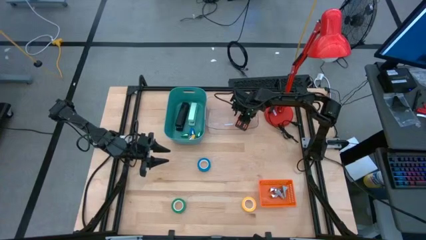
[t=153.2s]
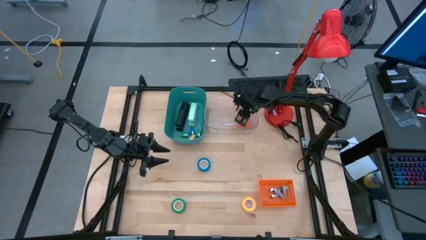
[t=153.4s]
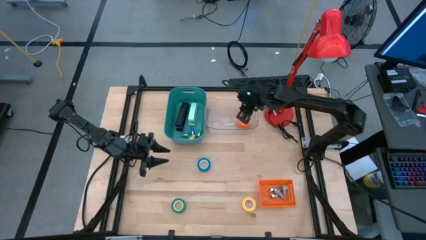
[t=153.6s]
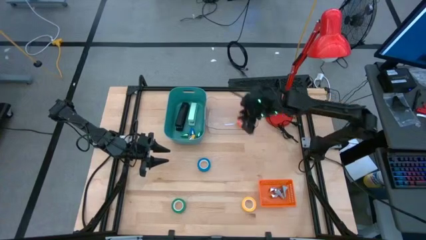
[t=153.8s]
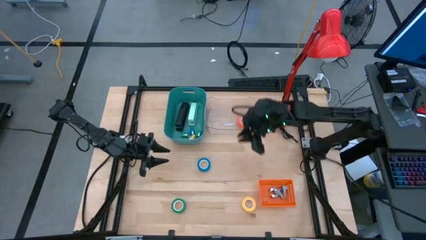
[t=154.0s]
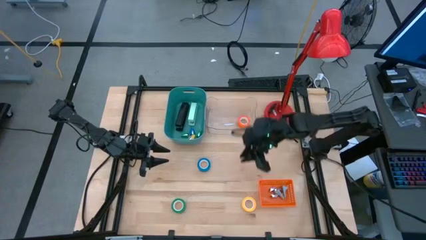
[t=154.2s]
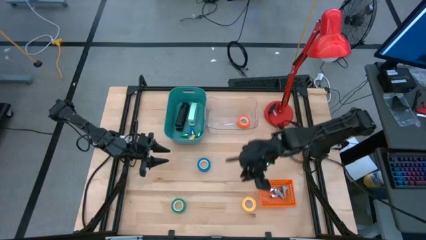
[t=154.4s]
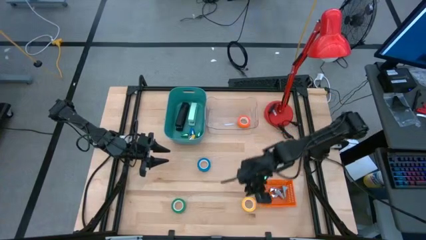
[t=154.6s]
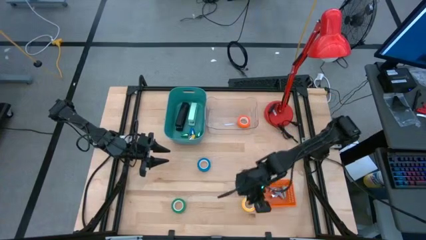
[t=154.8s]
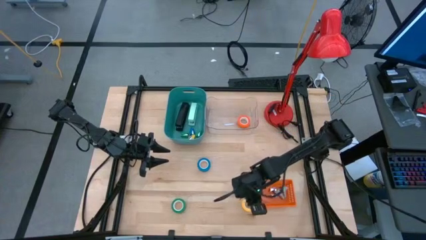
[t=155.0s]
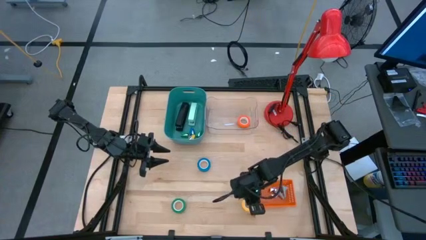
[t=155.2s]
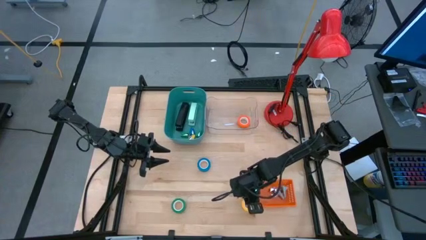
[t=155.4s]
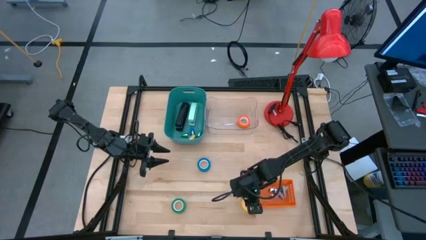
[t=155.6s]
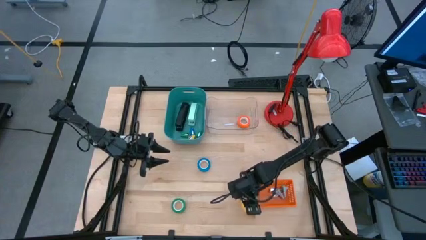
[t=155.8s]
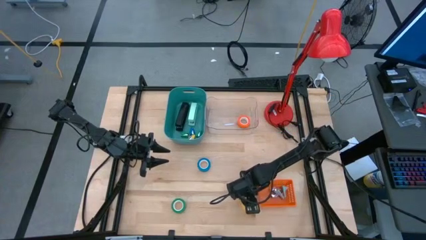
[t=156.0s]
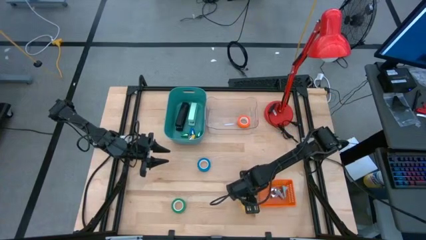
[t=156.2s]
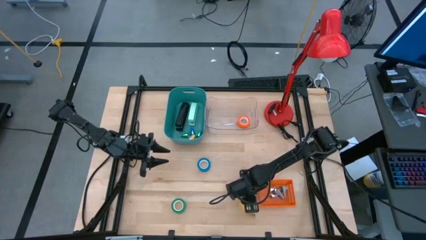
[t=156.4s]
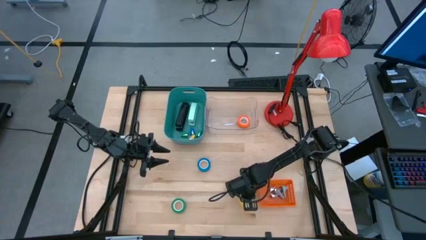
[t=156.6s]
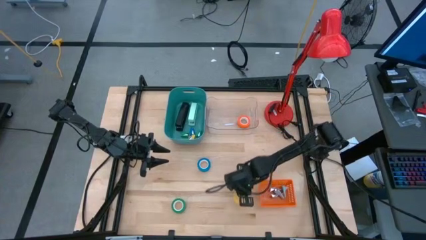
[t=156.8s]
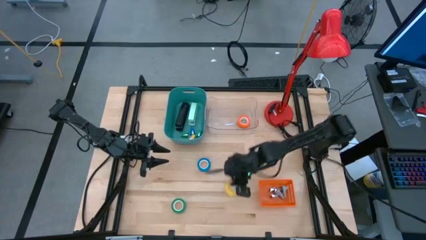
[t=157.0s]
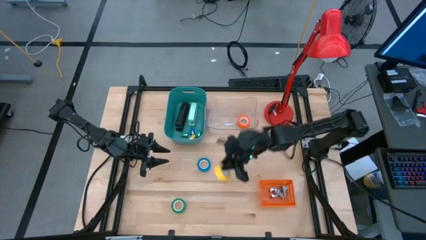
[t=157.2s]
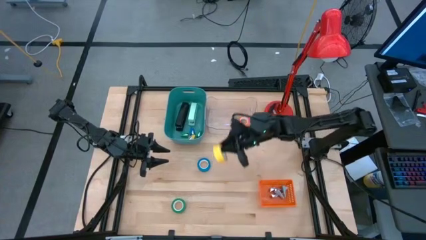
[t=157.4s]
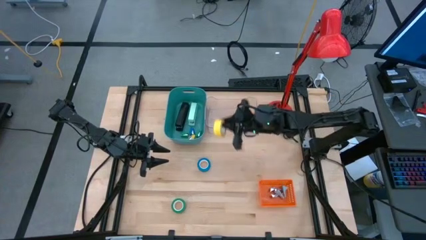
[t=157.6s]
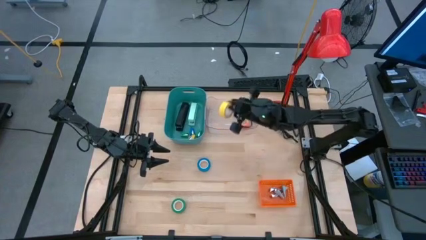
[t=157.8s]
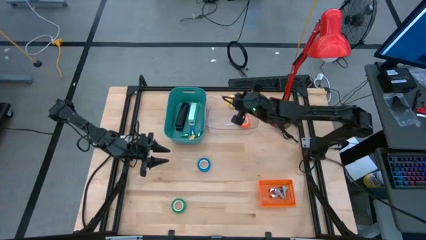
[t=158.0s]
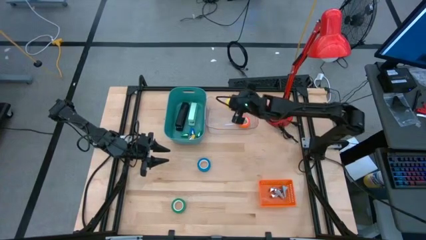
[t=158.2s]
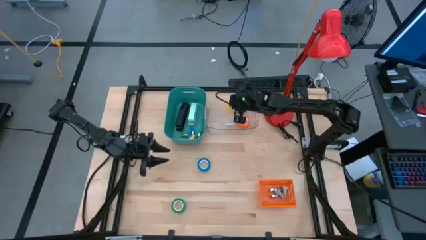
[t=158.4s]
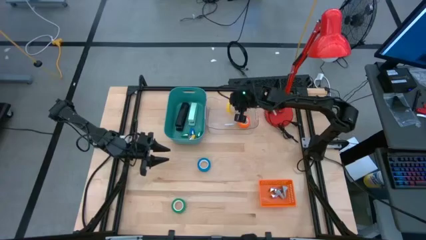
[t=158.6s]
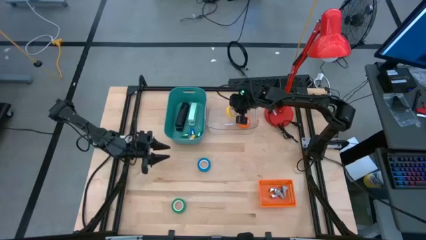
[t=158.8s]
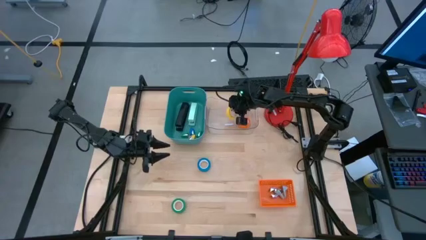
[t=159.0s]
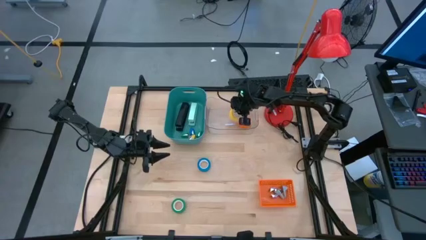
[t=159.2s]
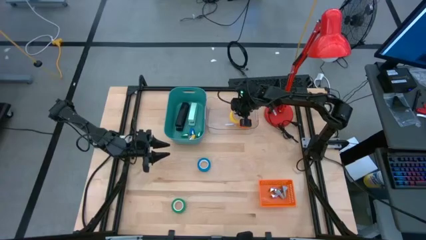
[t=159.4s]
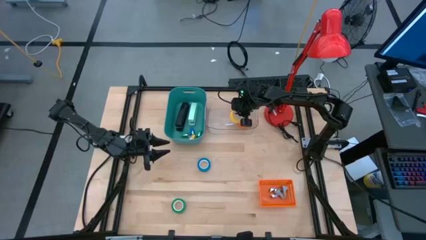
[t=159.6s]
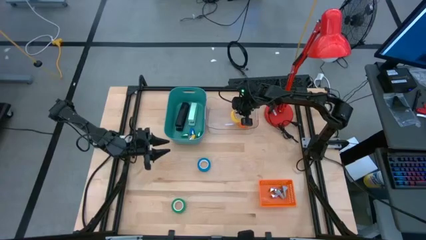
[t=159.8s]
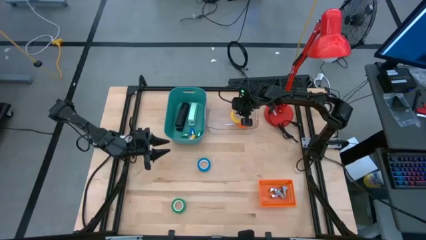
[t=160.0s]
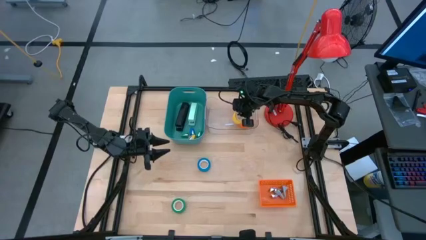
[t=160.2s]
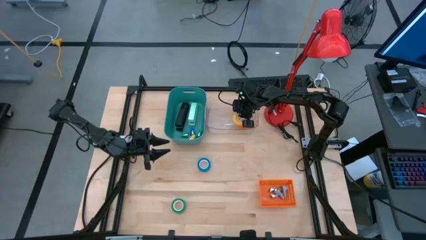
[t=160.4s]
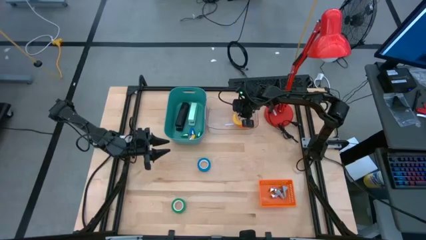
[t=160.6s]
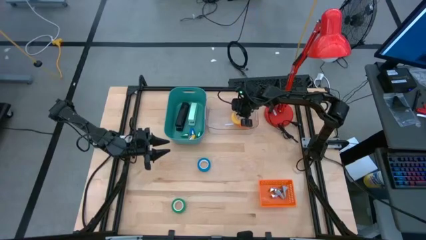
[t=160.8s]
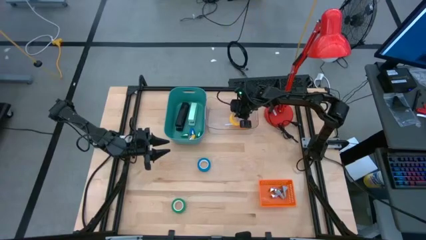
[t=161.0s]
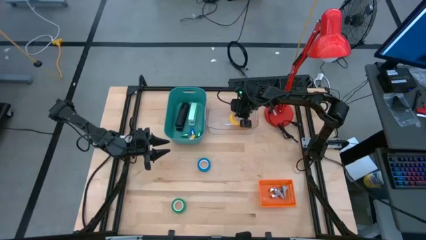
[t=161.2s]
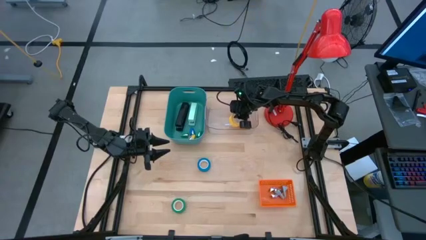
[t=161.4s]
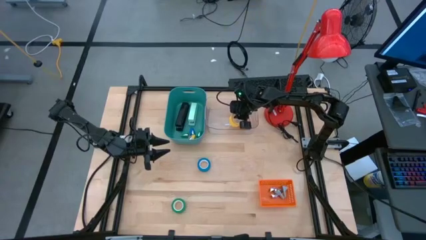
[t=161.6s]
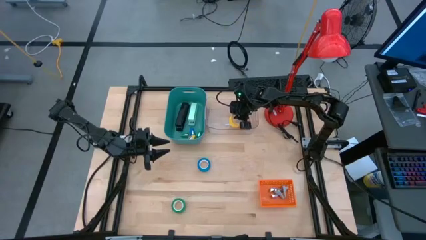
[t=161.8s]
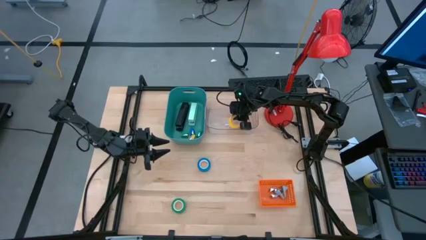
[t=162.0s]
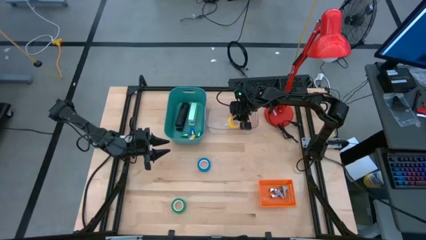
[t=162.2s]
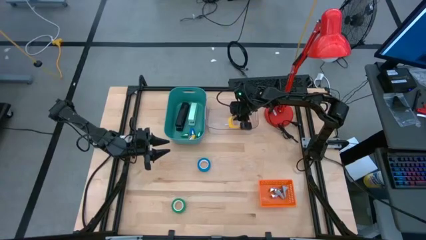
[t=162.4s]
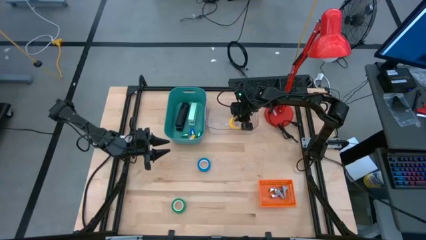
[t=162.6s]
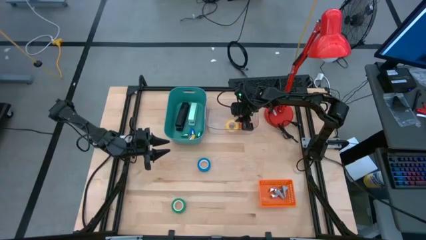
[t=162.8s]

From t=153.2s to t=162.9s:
Task: Pick and place Stapler, Stapler remover, tape
Put the yellow tape into the transparent bin

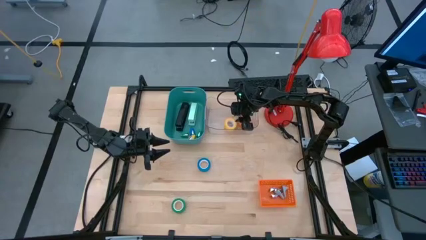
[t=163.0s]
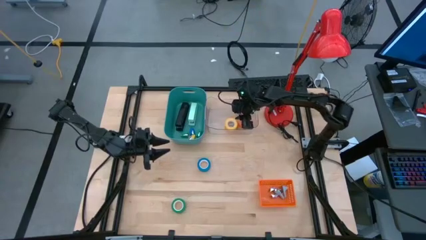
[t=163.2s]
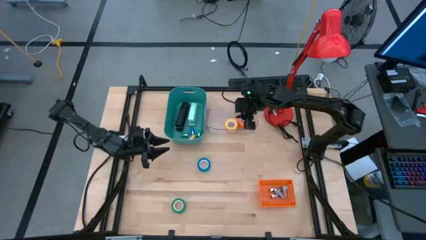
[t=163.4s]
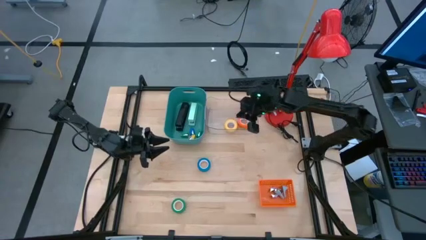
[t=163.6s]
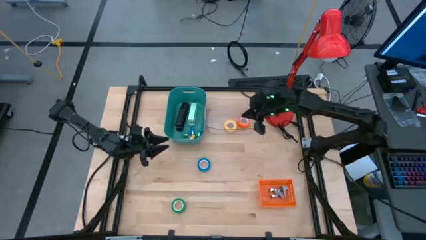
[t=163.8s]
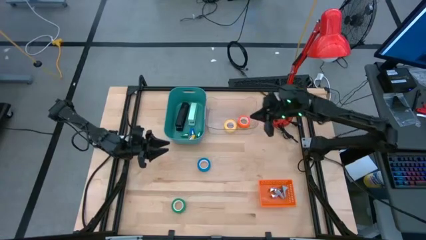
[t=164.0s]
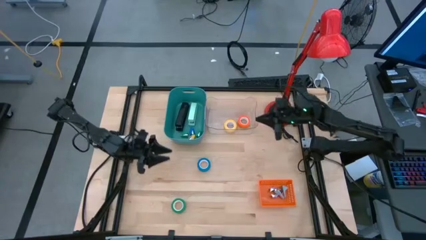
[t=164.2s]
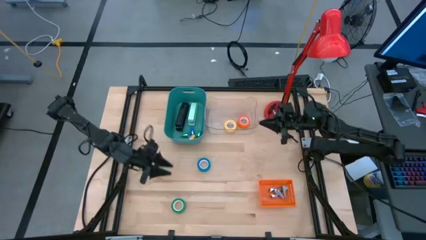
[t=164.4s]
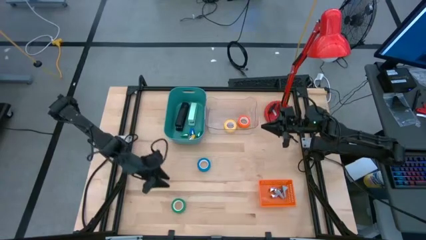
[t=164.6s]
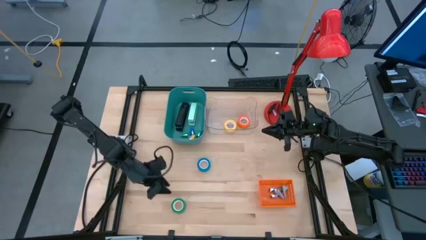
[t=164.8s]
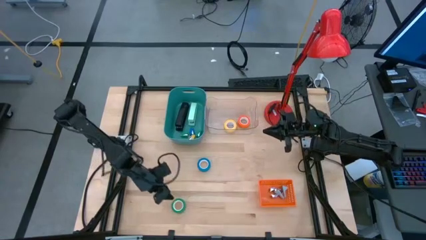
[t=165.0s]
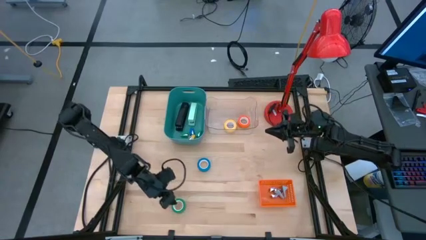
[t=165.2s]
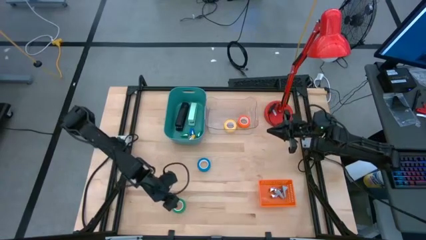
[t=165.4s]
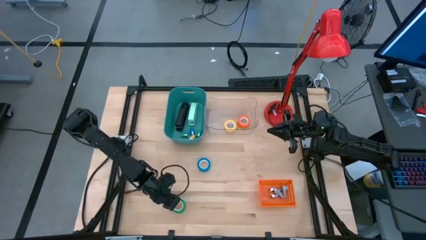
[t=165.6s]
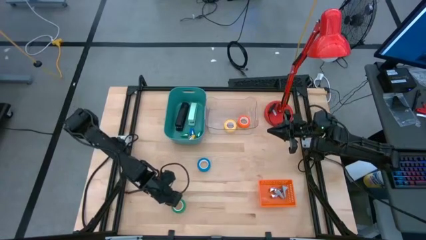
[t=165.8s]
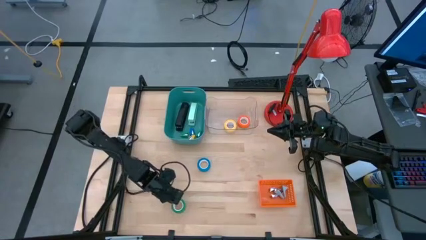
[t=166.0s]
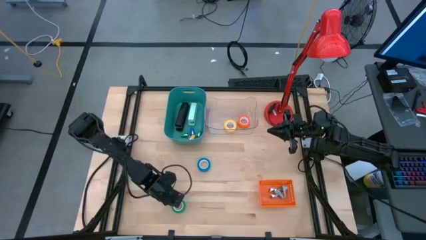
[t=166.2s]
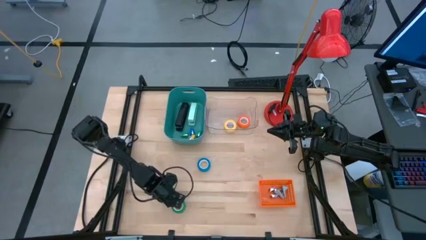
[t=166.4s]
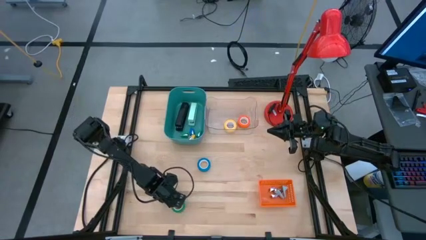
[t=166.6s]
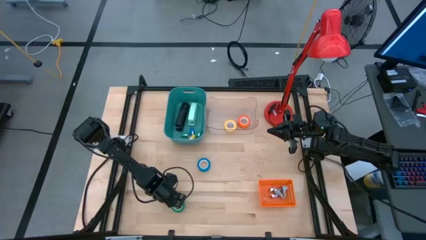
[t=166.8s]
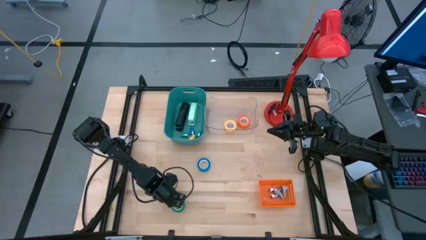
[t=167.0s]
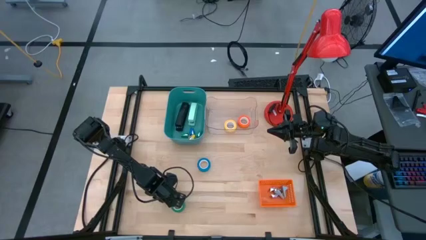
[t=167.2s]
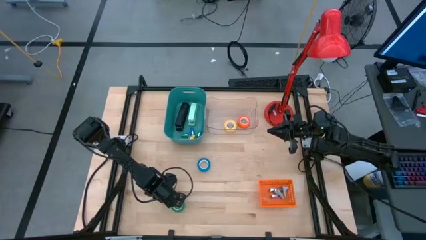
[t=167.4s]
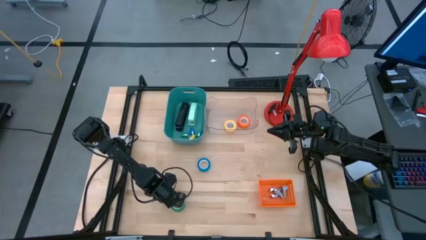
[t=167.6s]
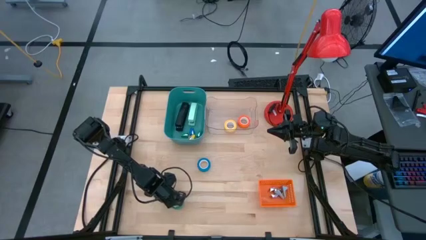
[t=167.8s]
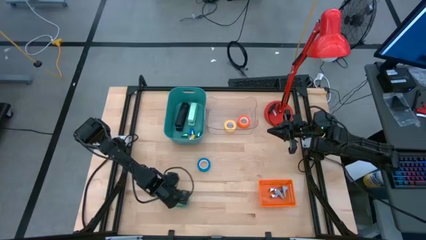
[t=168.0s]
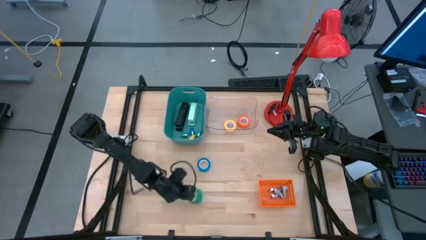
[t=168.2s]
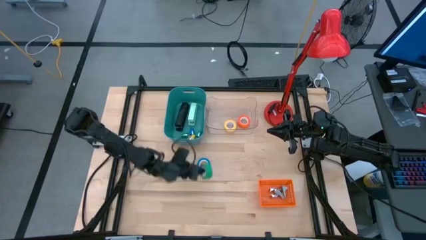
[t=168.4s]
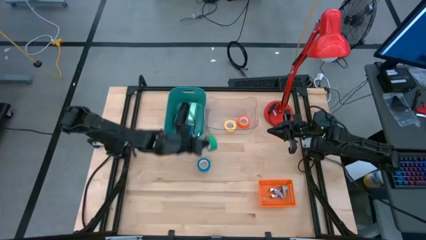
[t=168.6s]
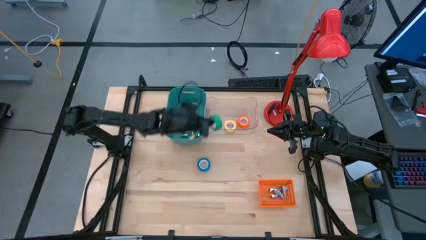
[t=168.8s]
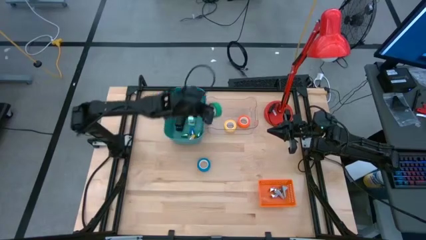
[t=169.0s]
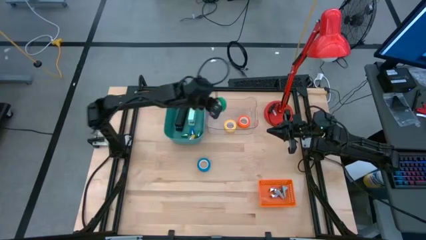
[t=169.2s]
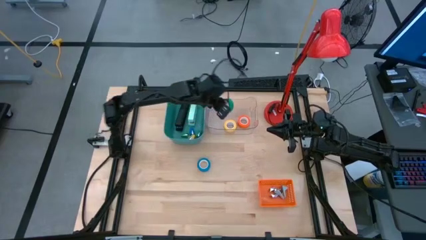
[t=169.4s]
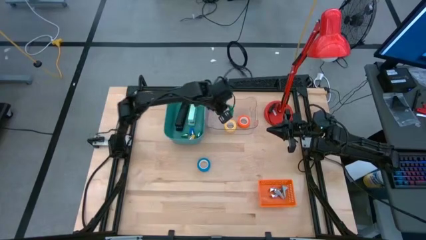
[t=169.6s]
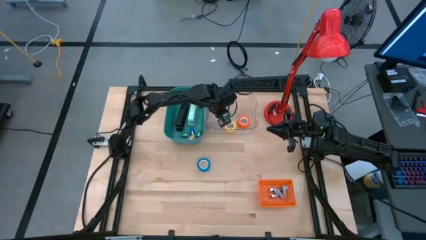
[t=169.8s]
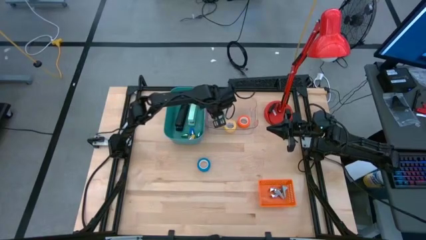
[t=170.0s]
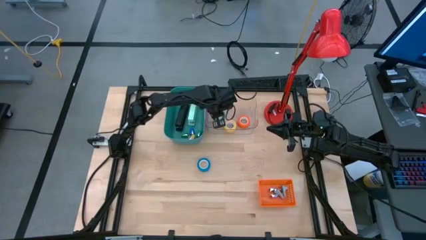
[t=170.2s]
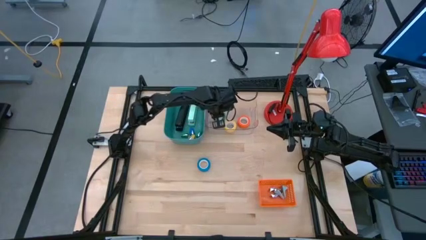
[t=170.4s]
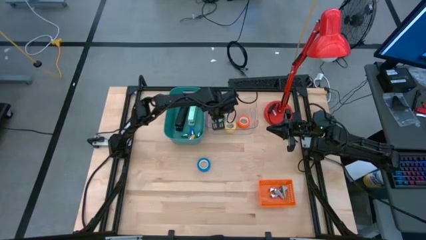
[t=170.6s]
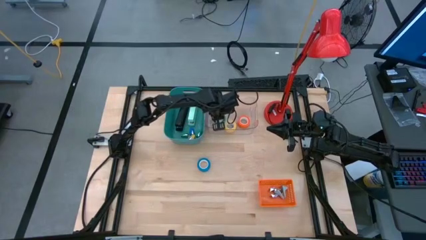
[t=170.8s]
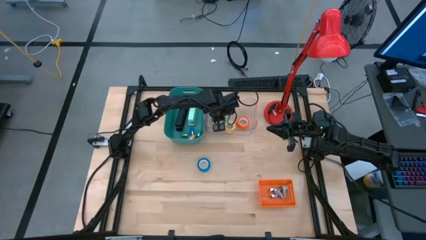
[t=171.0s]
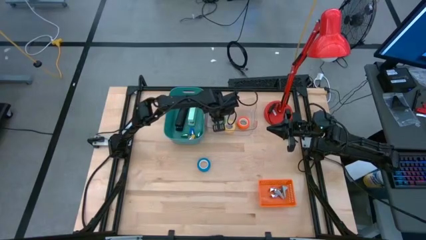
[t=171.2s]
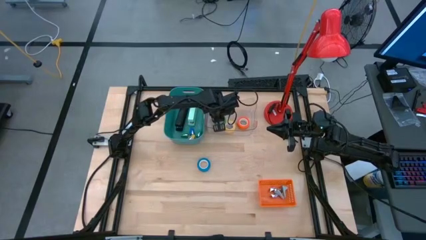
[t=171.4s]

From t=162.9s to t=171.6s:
Put the green tape into the transparent bin
